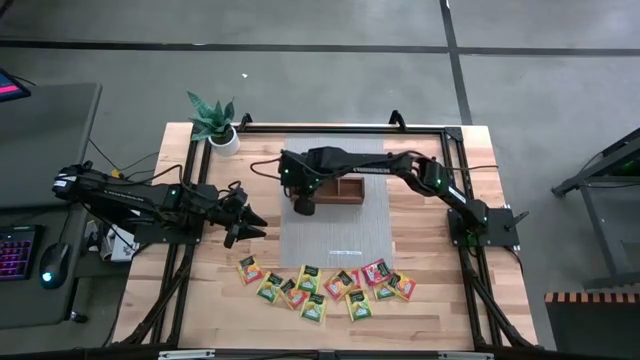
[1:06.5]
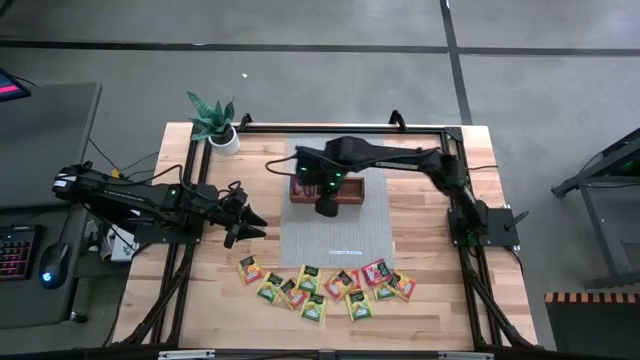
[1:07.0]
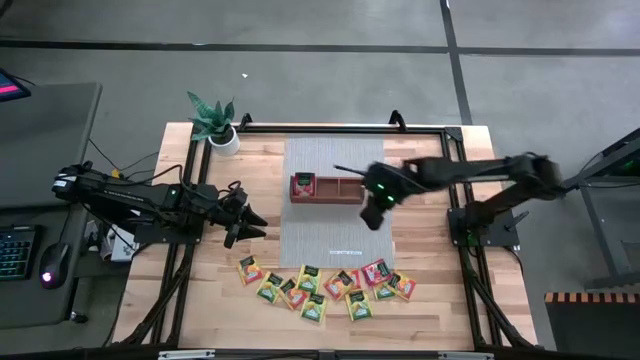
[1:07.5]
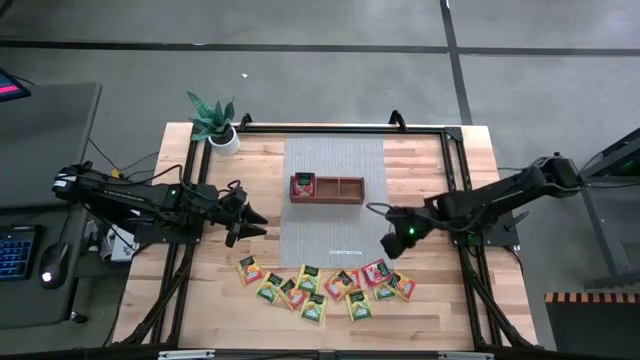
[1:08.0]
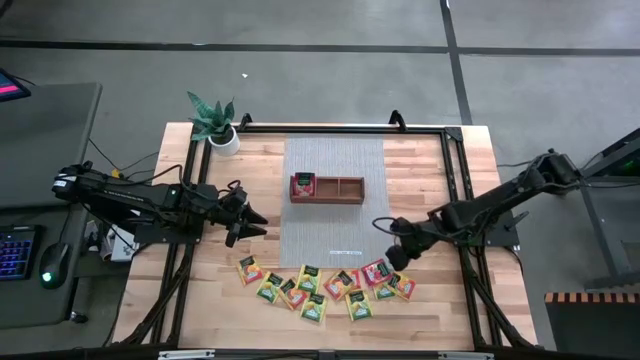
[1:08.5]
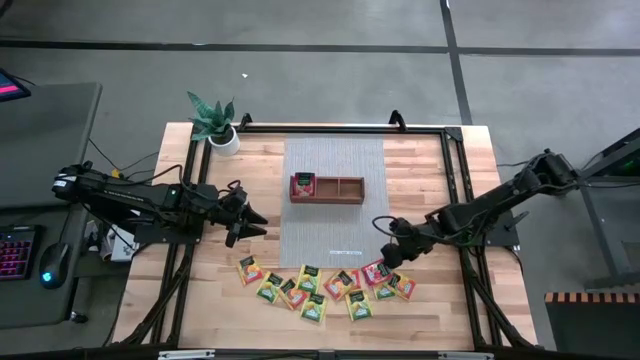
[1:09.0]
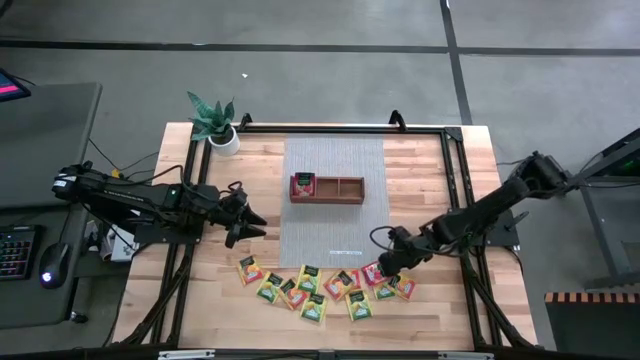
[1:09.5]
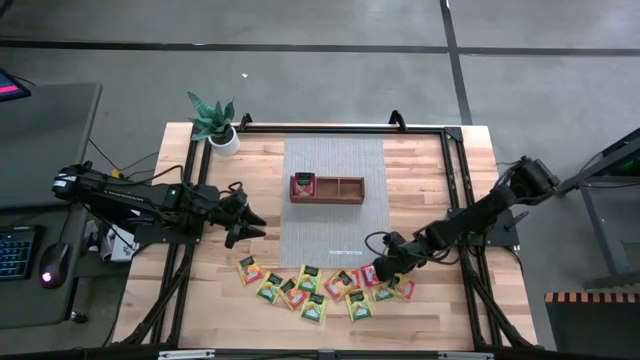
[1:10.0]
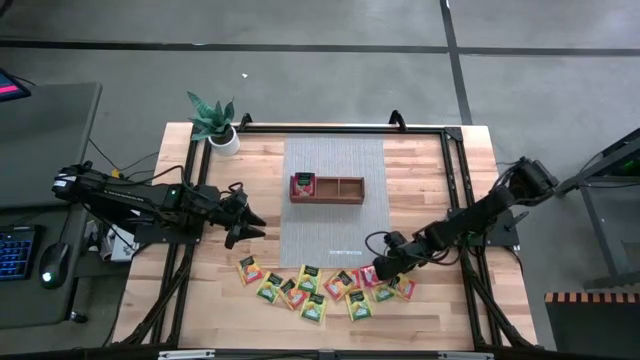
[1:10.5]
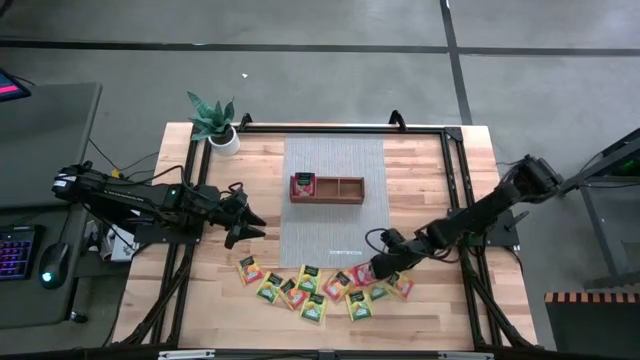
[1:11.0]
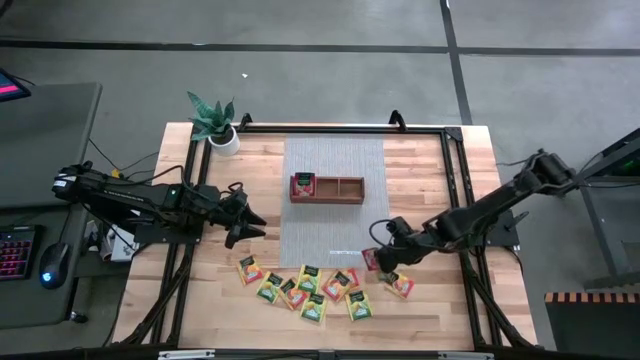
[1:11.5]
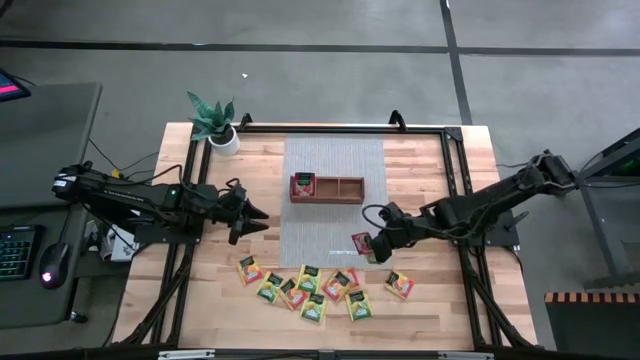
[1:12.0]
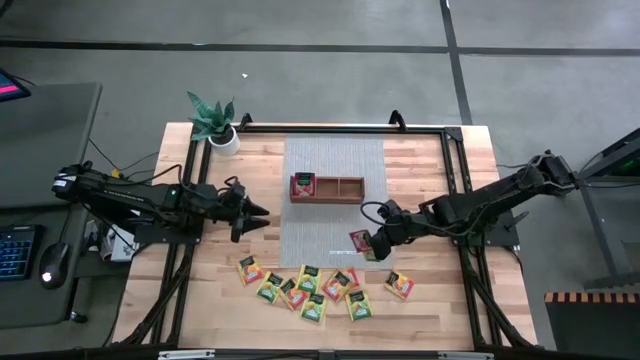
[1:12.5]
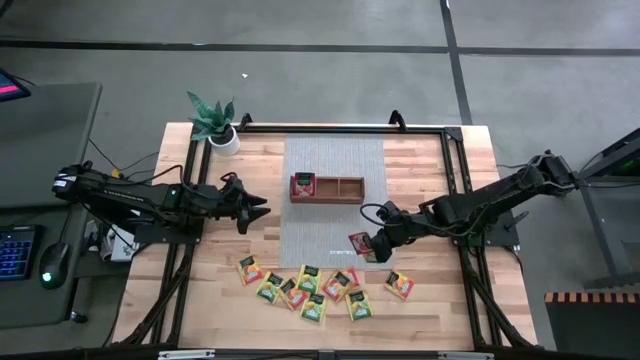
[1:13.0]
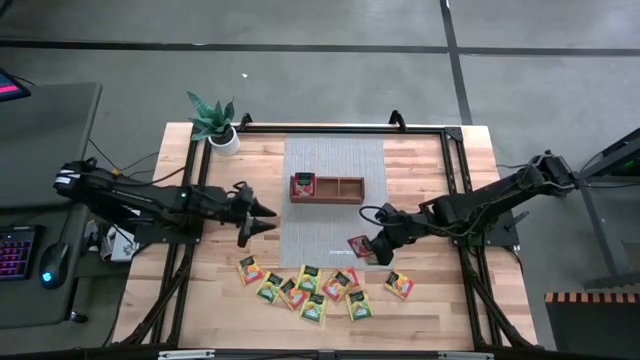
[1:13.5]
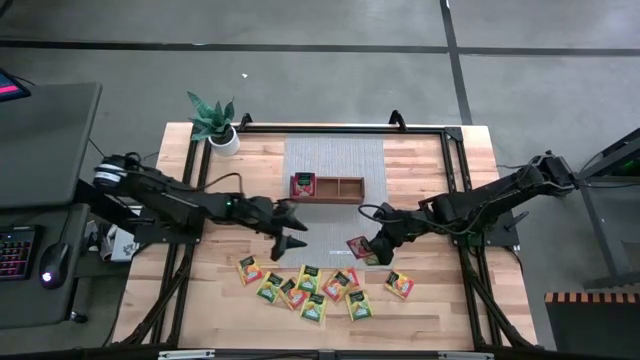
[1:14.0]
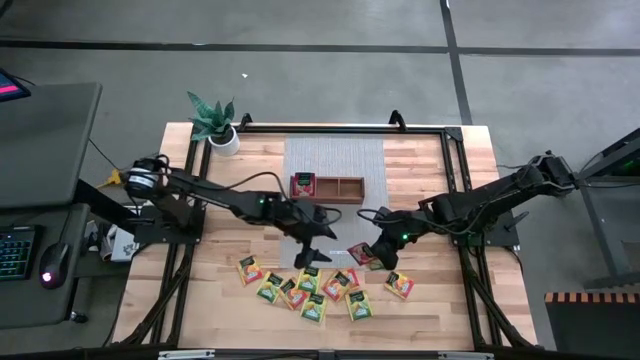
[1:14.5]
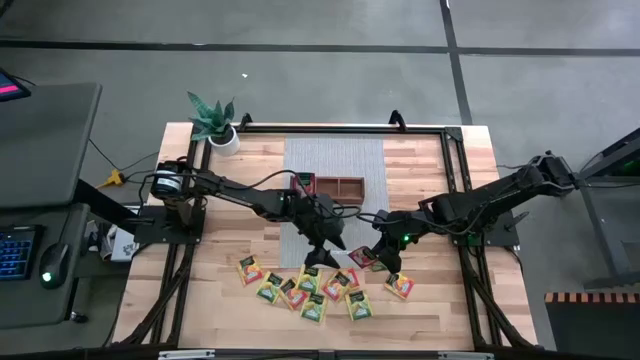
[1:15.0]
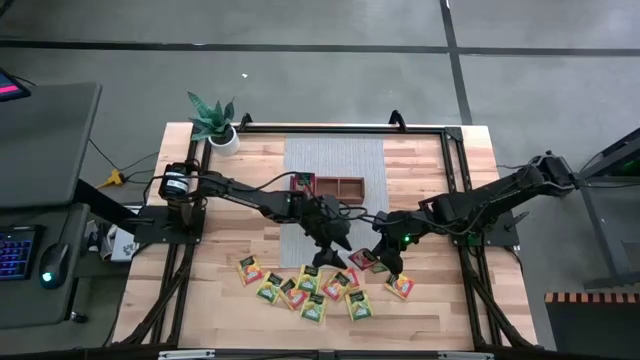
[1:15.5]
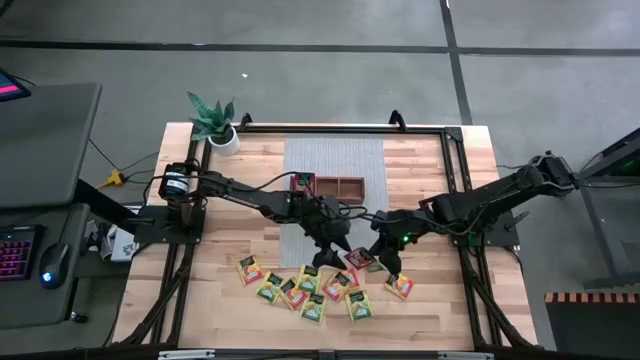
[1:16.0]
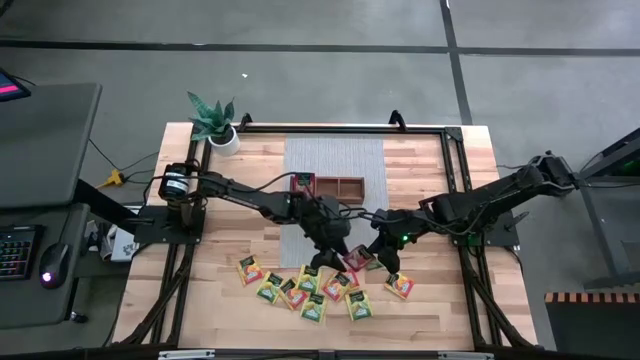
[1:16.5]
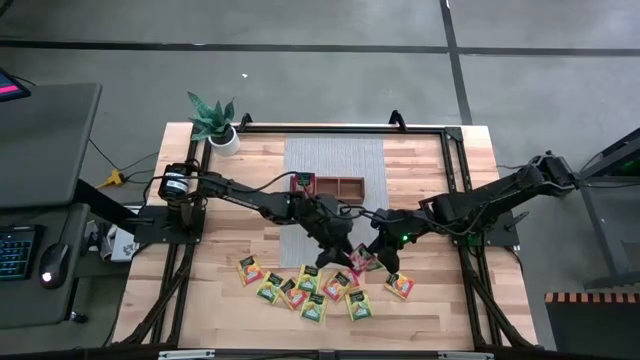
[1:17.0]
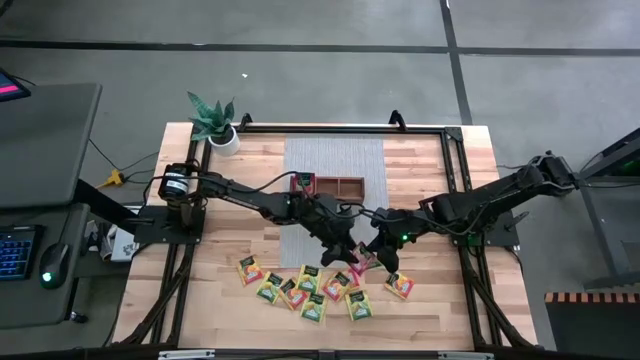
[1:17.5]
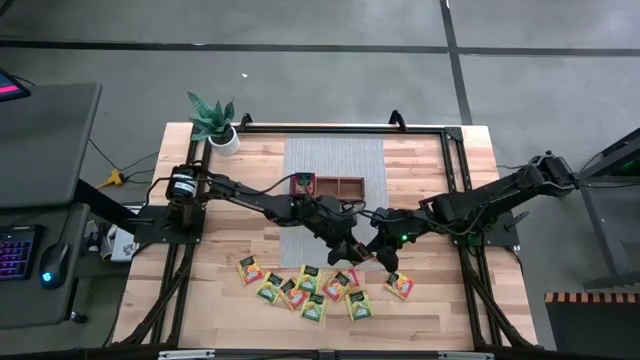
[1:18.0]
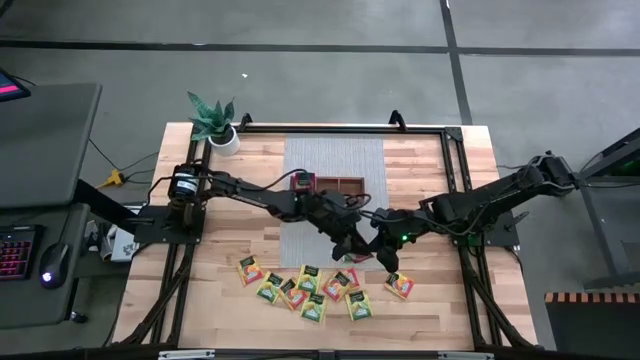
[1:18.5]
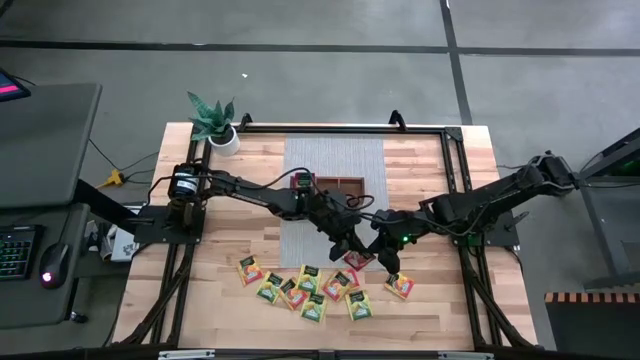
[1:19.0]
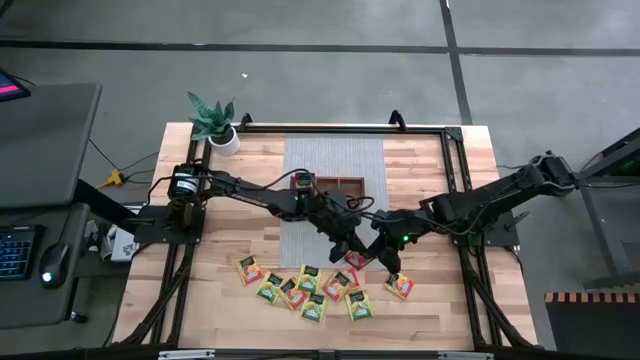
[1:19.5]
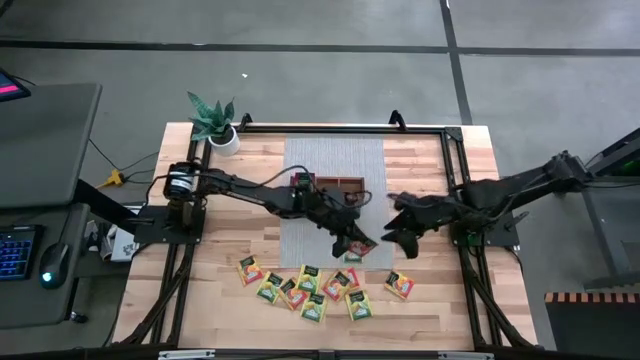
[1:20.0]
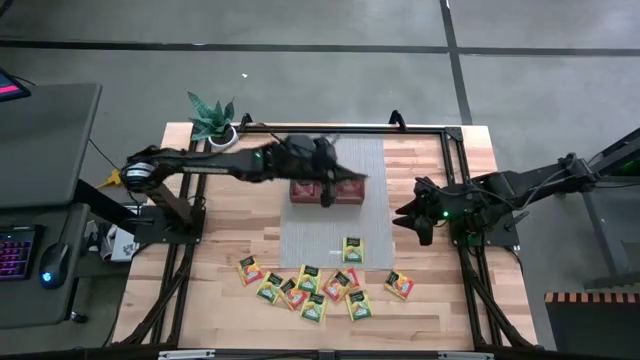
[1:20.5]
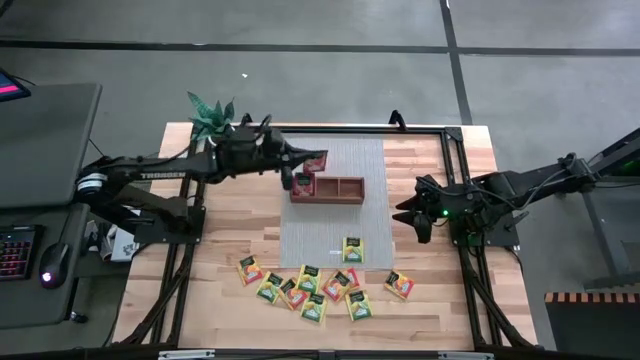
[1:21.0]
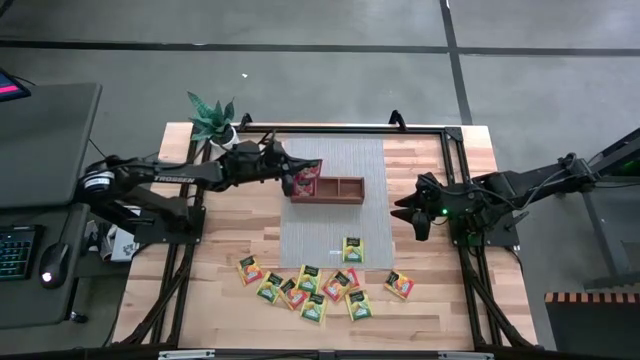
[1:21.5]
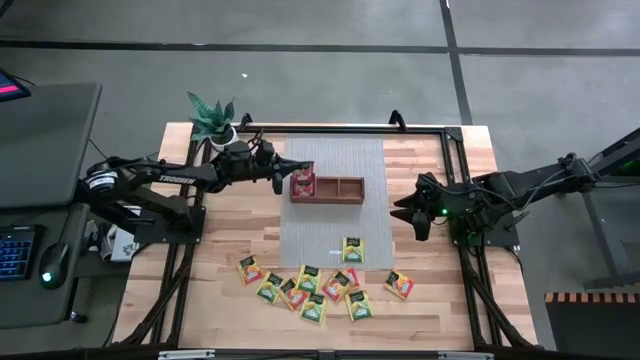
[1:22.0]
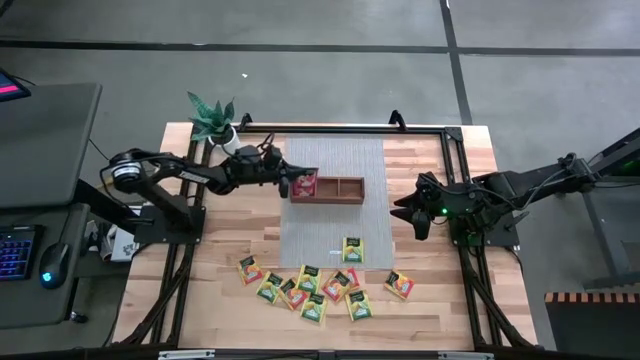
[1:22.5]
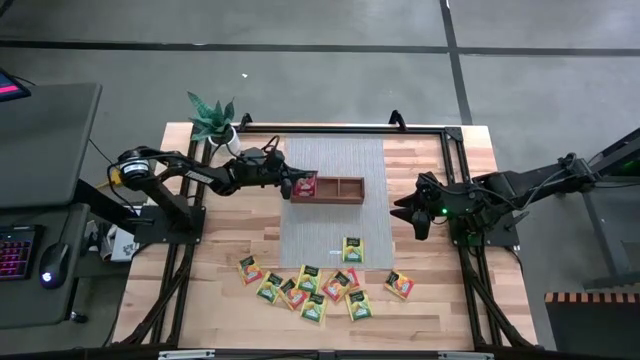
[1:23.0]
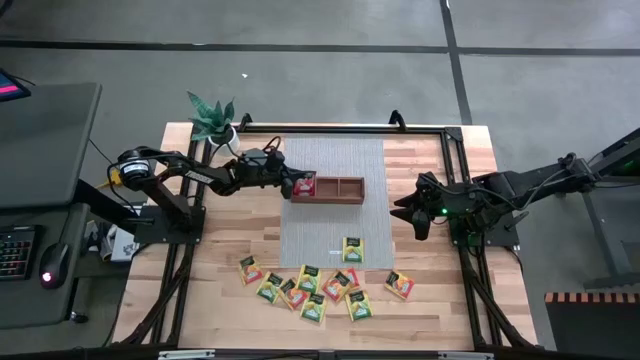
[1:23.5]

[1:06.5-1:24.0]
Task: Pick & Place Tea
Put the red tea bag into the left section of the wooden organizer

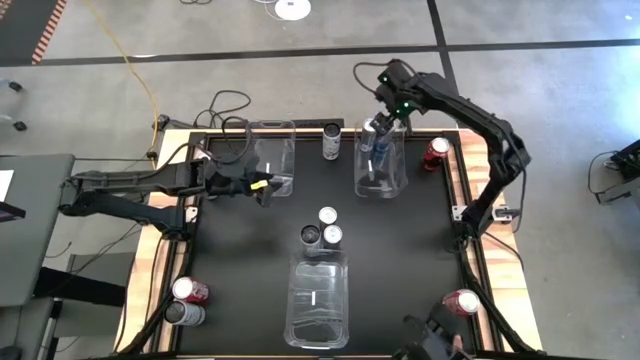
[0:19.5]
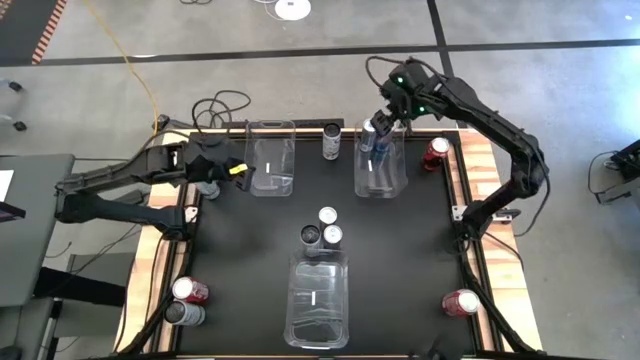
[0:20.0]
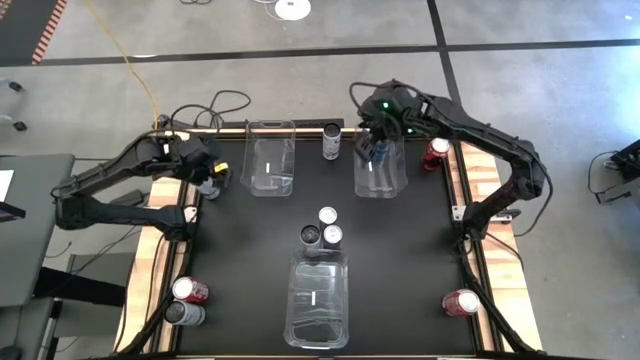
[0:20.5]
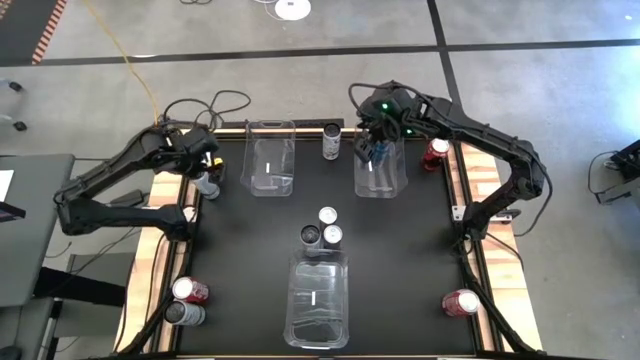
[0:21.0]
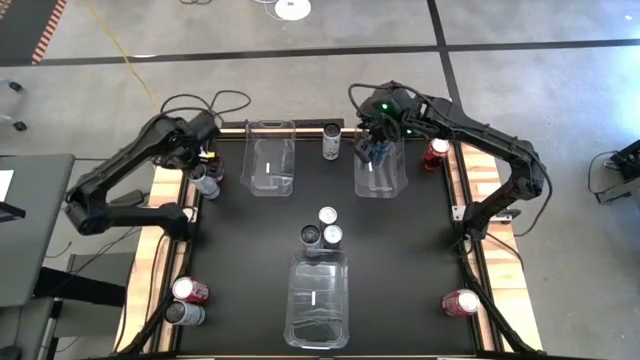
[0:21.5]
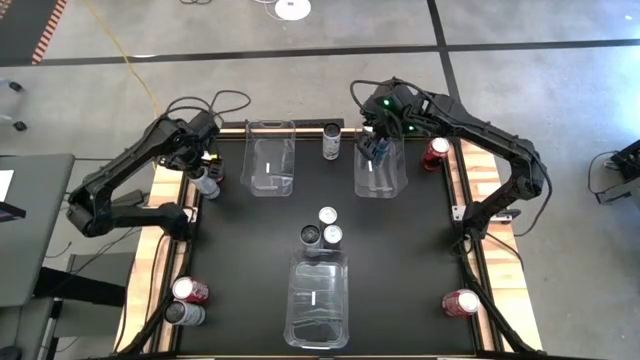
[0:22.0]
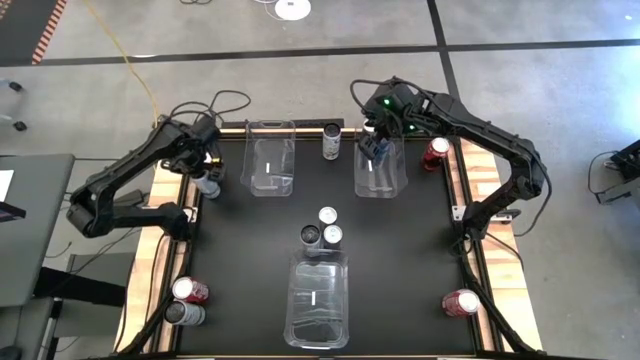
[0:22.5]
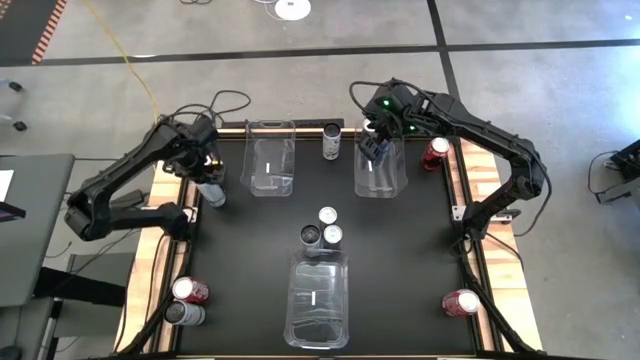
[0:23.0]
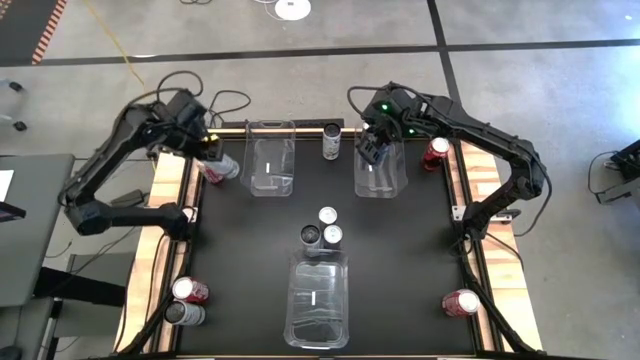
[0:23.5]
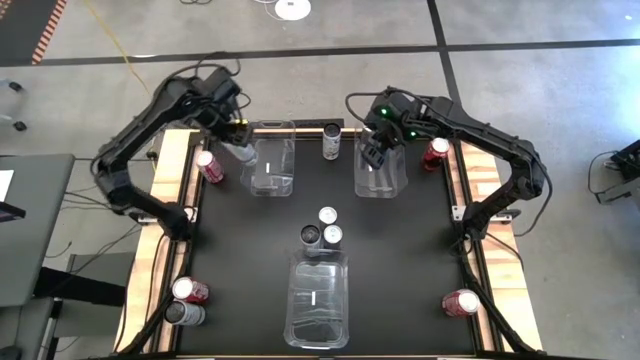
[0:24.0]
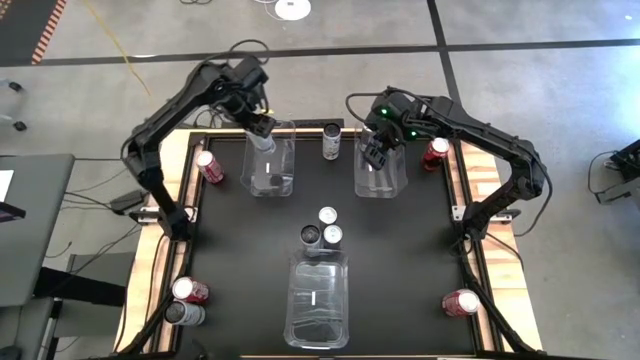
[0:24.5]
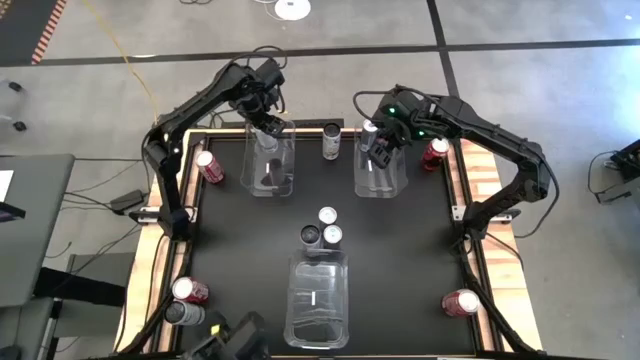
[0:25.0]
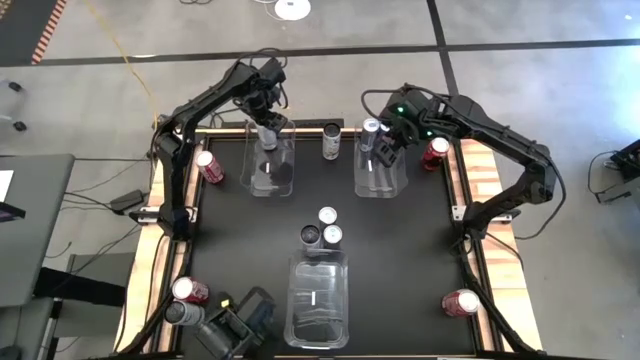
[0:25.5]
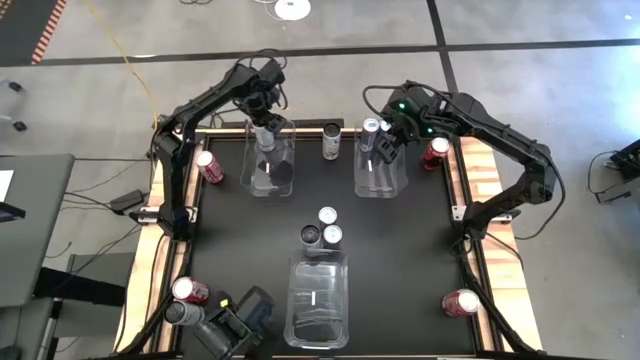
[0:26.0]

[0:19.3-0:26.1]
Task: Sort soda cans
Put the top left white soda can into the top left transparent bin
